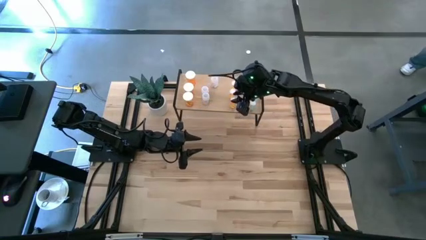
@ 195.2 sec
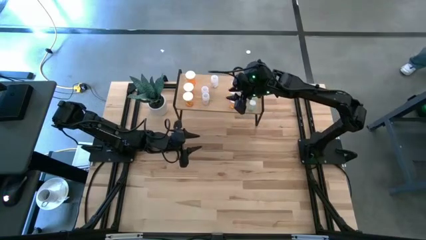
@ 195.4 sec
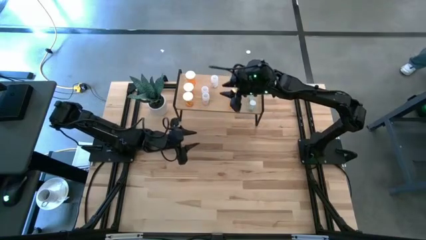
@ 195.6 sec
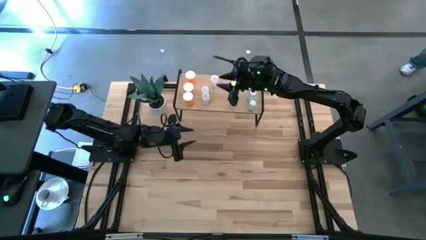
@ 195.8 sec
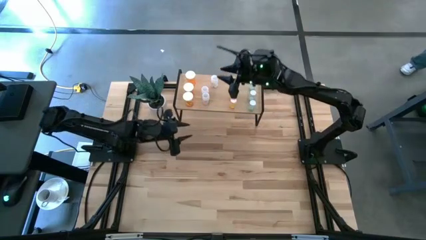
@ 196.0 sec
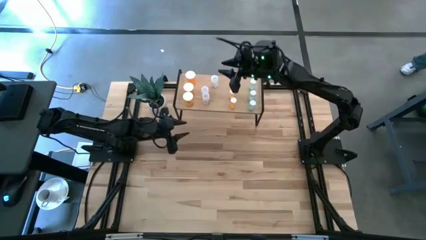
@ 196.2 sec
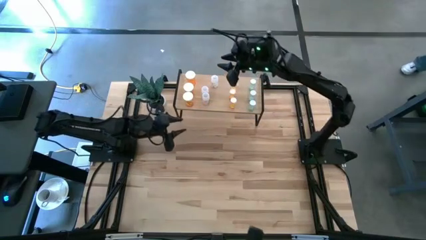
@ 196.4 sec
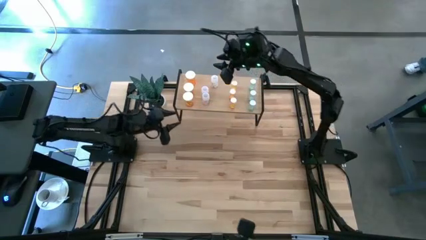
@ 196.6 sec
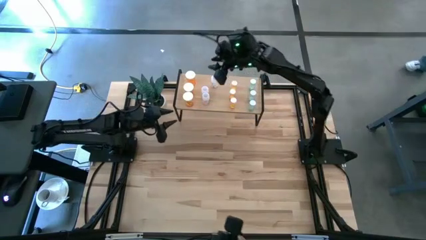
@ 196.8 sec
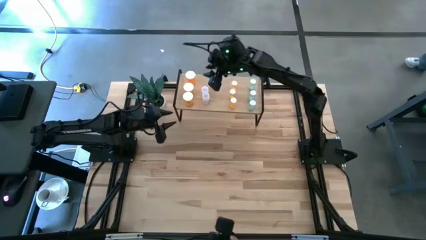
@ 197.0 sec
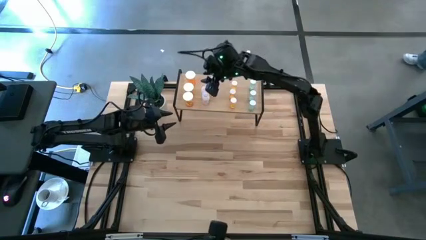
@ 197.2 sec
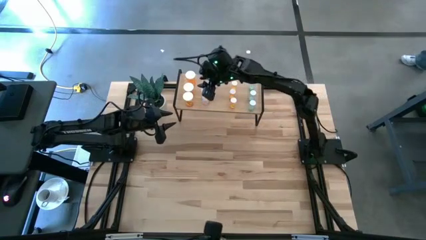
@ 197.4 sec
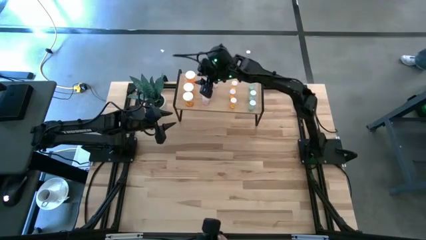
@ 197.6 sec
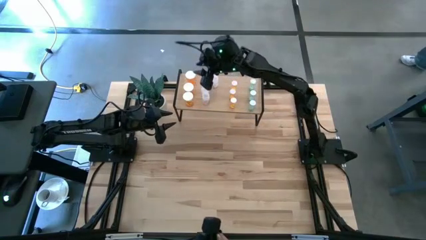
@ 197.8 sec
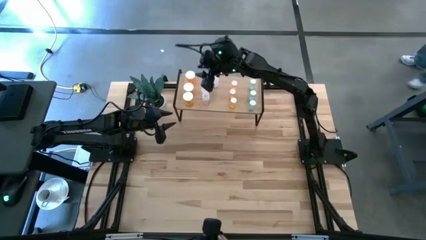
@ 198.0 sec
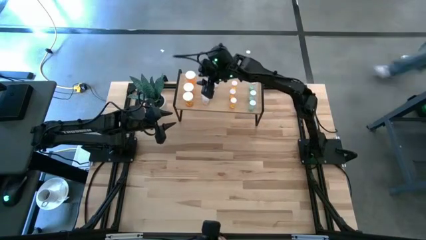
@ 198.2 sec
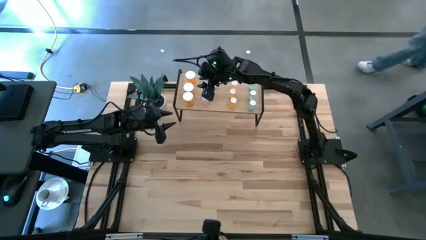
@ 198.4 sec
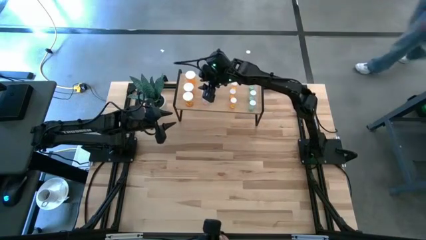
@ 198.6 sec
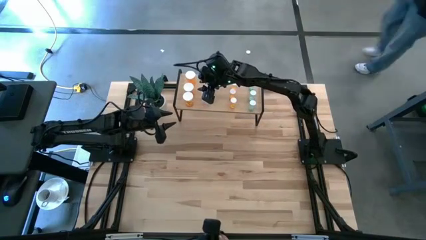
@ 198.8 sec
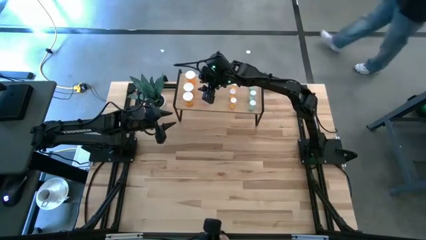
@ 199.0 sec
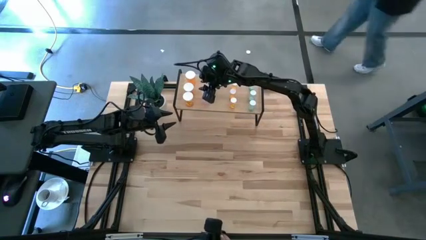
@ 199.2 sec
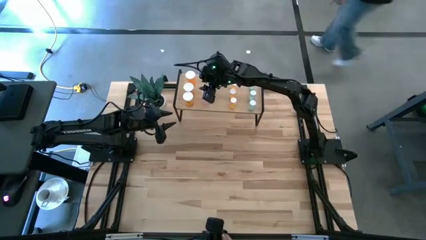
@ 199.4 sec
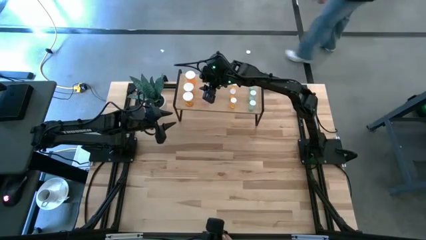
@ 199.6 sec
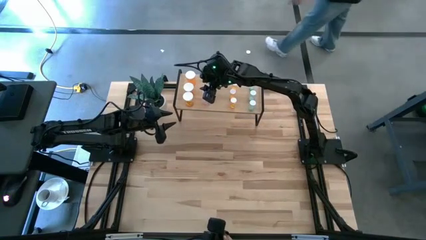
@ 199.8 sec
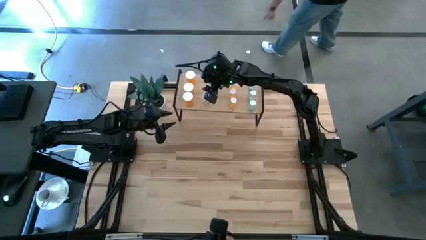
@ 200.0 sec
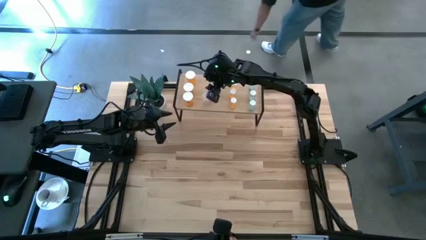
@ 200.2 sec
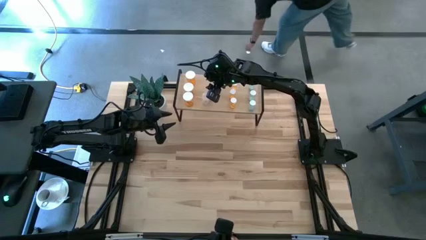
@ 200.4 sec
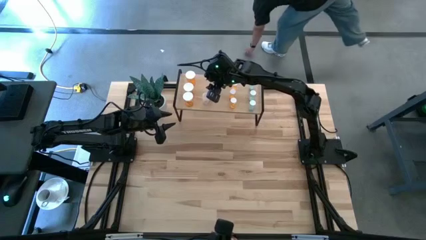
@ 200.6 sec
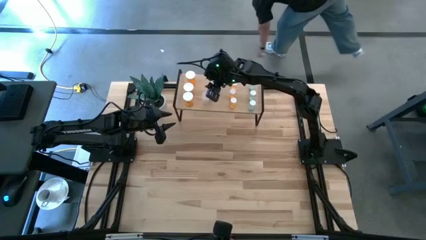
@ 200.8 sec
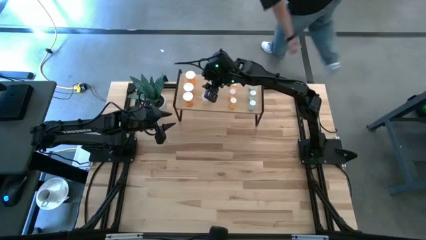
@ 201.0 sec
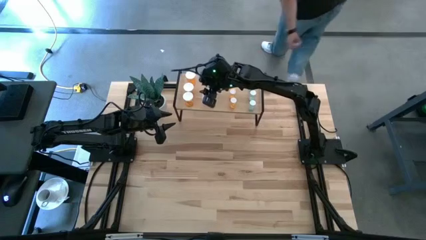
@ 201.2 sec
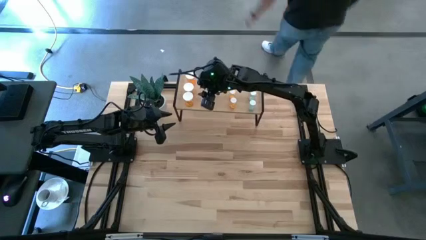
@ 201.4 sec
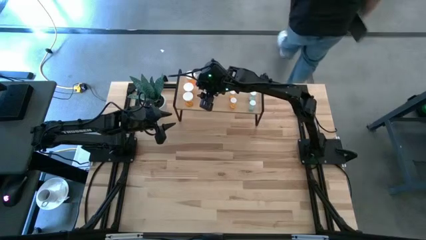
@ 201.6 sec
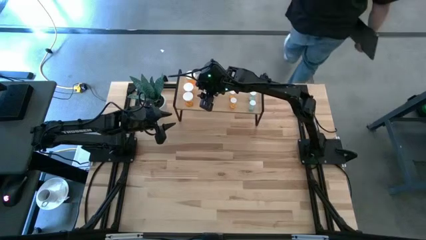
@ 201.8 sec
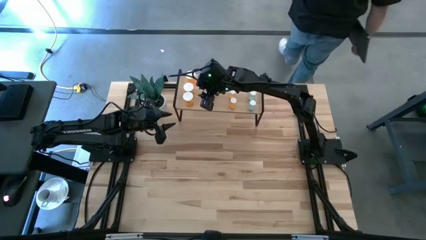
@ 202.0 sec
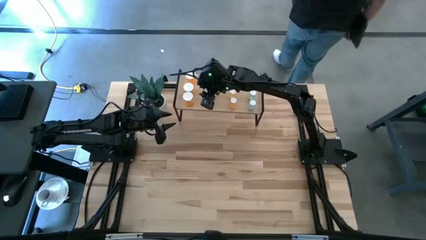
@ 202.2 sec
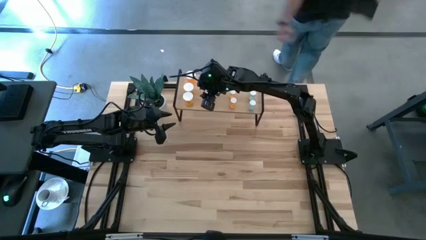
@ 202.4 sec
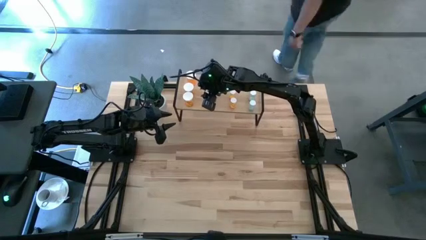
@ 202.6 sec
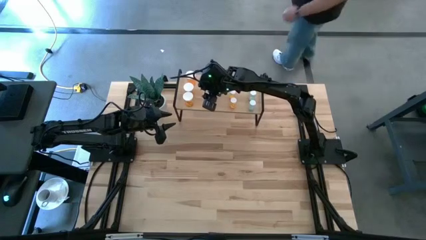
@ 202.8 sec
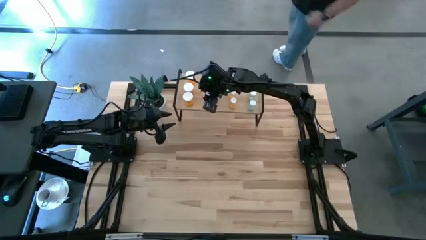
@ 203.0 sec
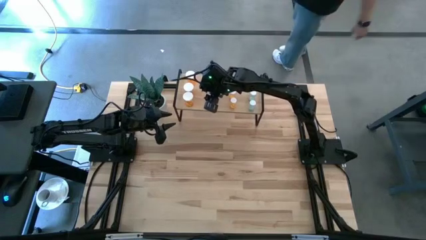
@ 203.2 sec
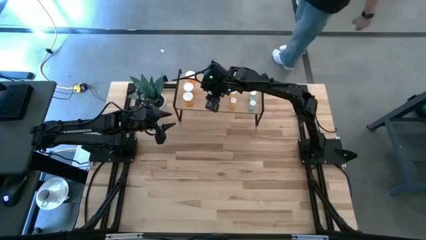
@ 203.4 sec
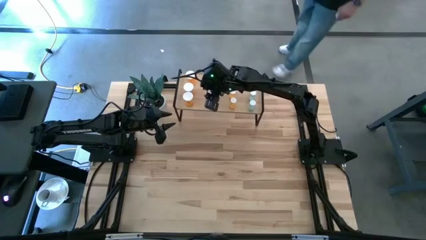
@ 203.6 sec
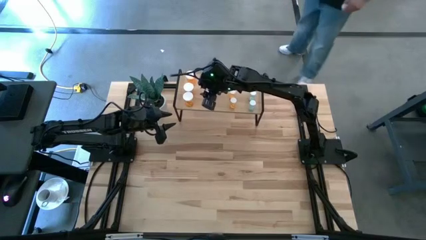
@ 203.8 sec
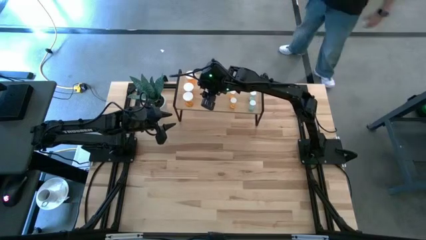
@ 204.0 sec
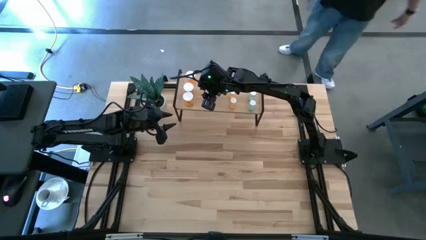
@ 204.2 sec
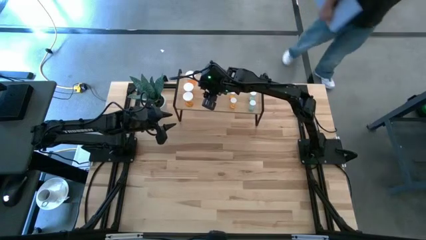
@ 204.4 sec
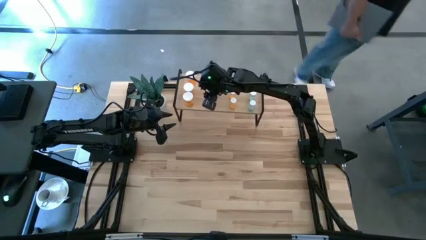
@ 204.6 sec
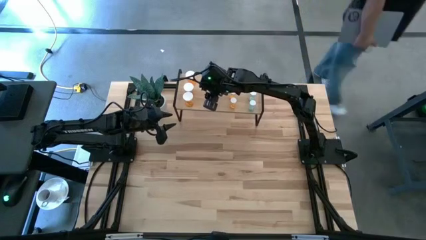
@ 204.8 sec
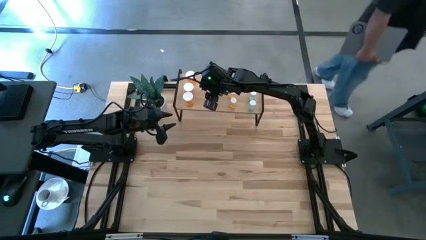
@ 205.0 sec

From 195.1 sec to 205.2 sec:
Task: Pick and place medicine bottles onto shelf by color
Adjust the transparent pill bottles on the shelf

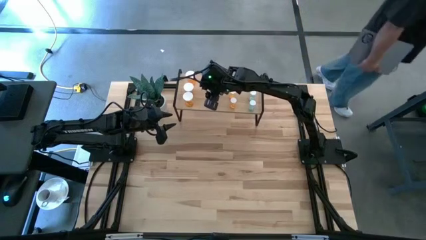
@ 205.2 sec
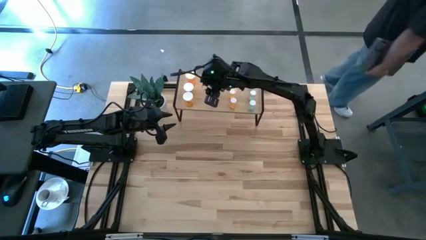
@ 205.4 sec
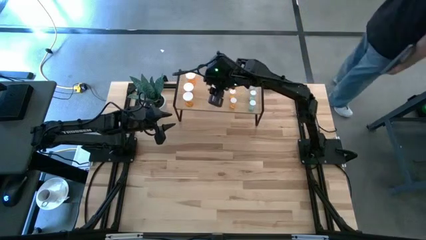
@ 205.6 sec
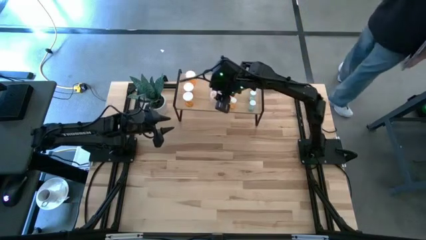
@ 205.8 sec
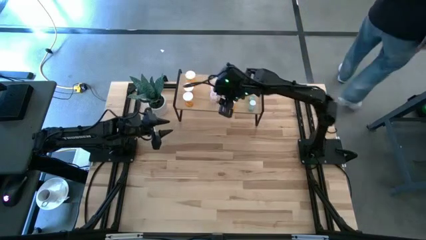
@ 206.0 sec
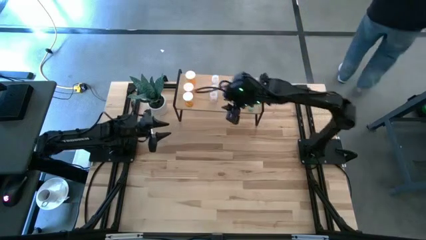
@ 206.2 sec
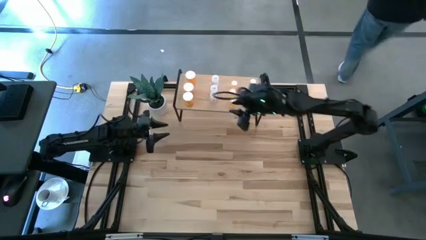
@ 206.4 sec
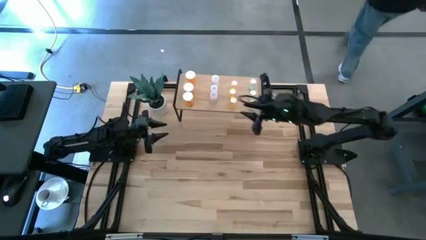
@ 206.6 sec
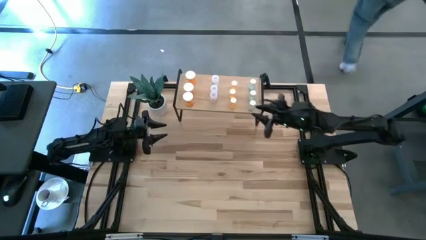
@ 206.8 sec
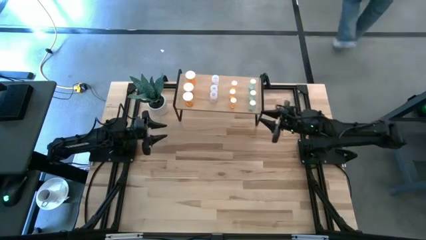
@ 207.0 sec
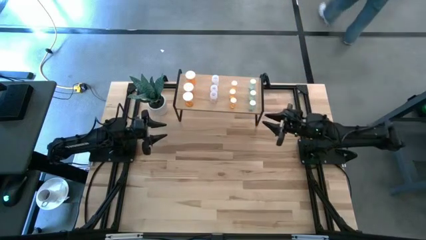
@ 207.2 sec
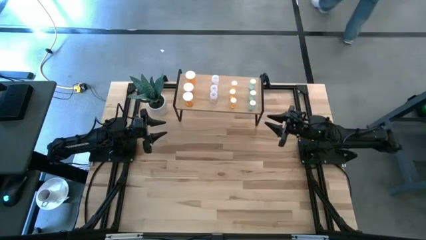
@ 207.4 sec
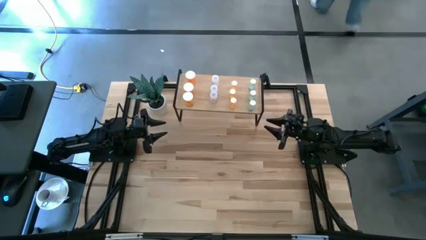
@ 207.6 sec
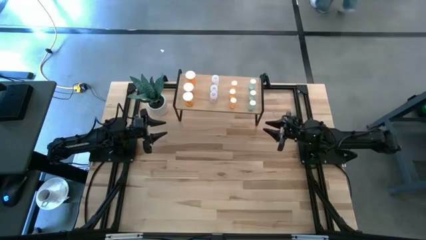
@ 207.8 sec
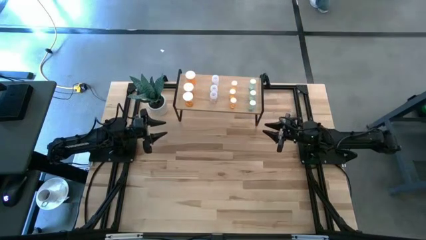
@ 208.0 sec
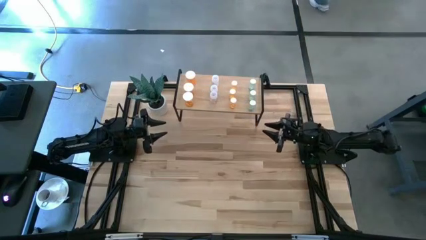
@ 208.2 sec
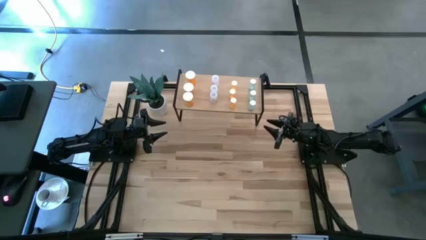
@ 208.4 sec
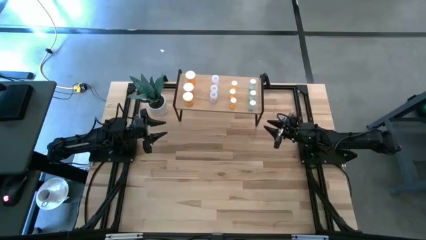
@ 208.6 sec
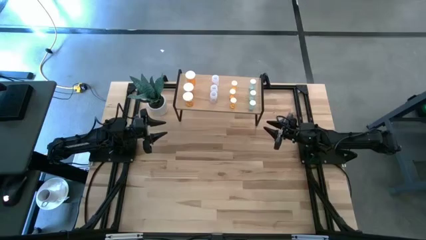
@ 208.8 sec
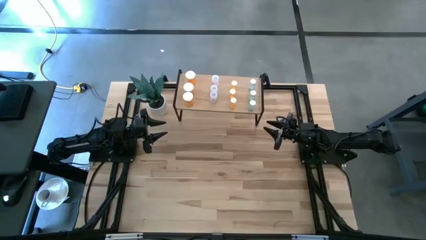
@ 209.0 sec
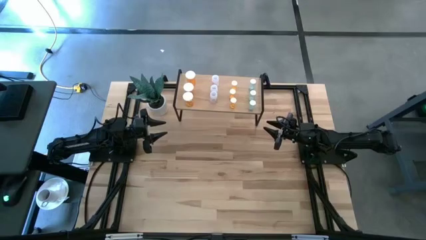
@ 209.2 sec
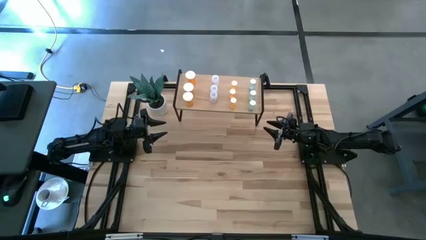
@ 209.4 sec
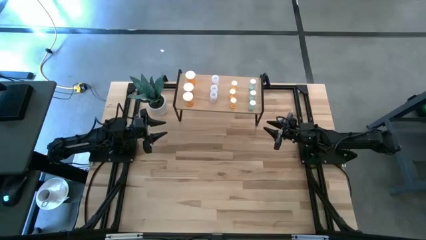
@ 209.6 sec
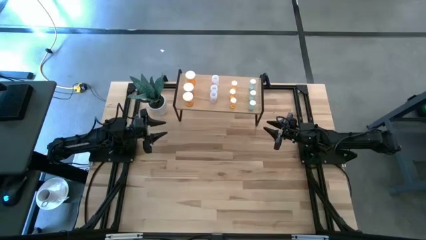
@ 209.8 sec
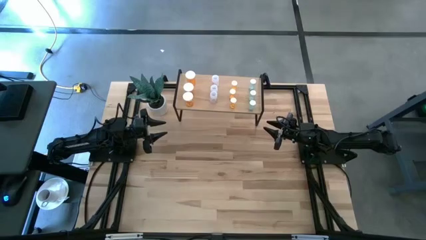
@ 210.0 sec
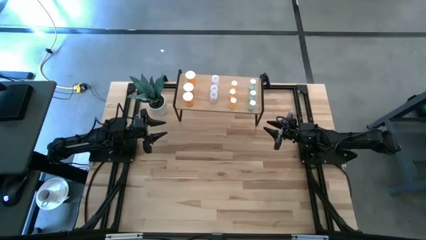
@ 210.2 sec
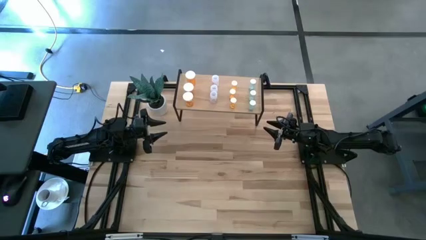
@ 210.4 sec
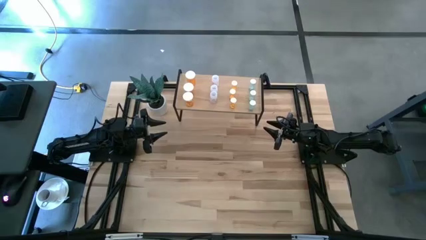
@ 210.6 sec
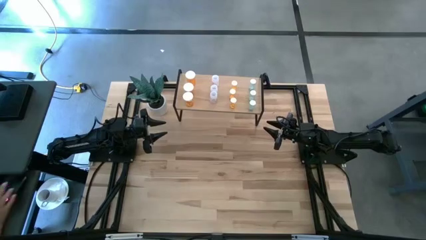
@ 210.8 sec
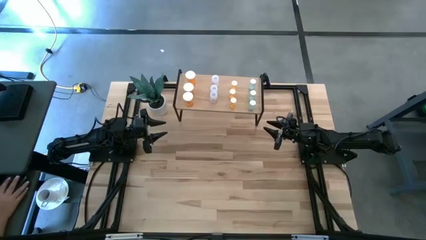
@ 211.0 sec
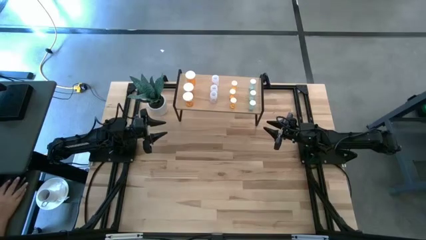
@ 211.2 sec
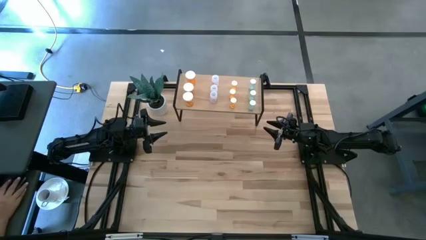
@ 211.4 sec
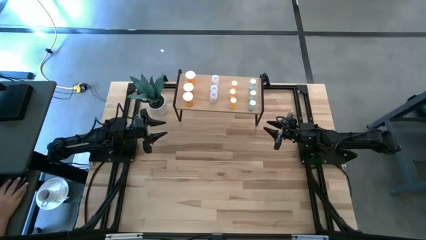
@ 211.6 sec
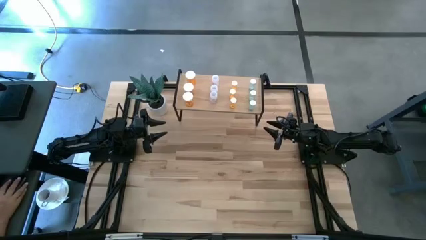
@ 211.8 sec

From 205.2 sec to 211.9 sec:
Return to Home Position
